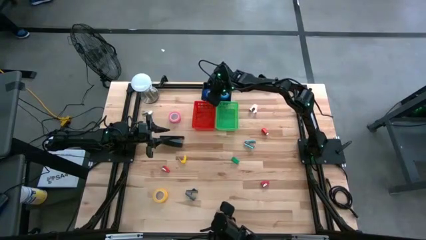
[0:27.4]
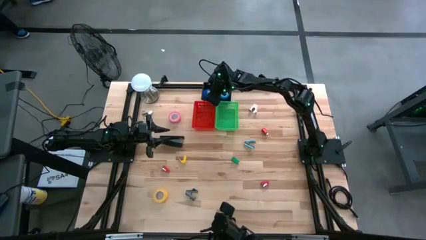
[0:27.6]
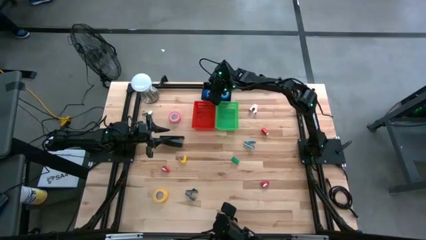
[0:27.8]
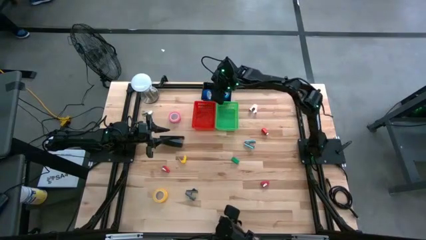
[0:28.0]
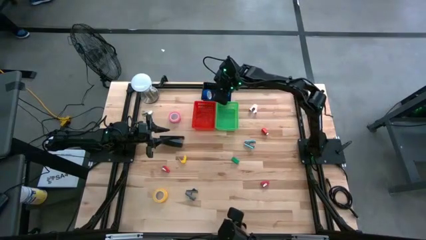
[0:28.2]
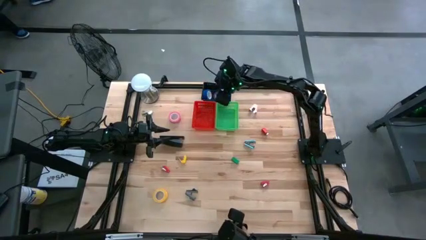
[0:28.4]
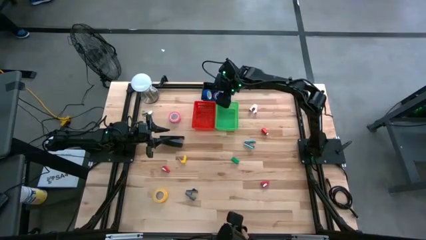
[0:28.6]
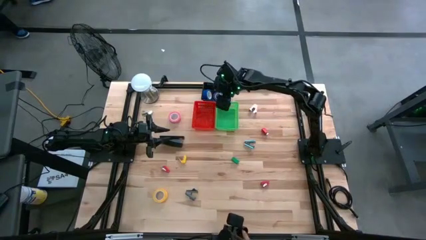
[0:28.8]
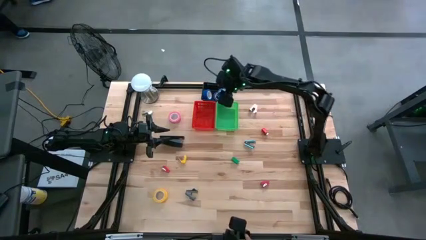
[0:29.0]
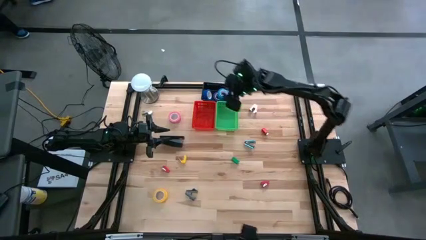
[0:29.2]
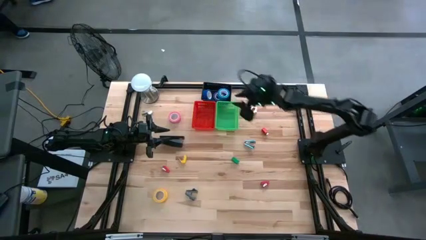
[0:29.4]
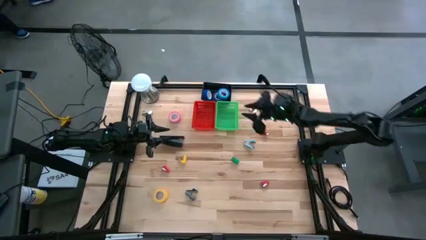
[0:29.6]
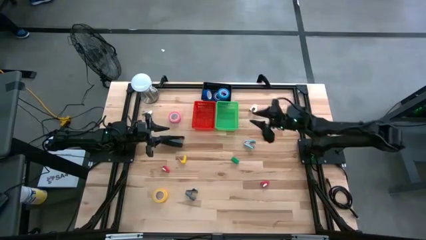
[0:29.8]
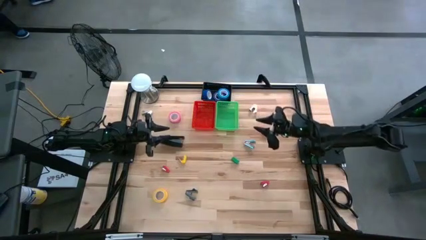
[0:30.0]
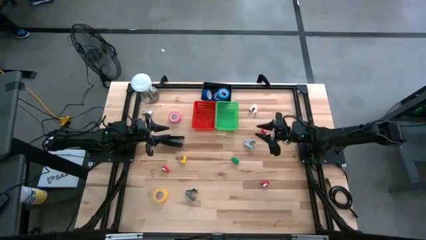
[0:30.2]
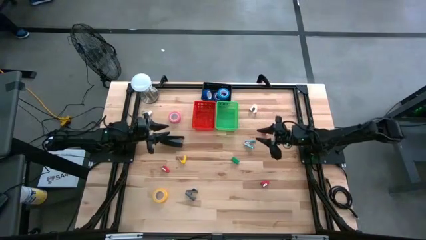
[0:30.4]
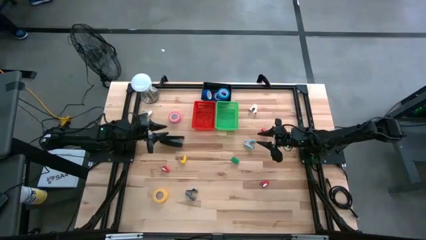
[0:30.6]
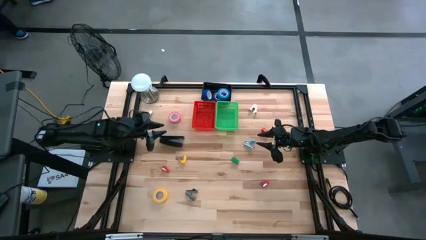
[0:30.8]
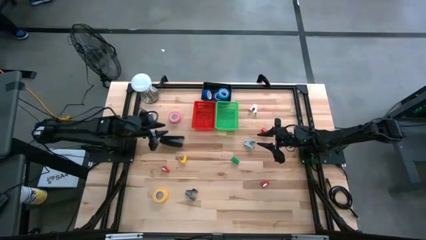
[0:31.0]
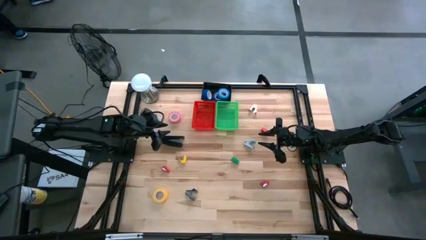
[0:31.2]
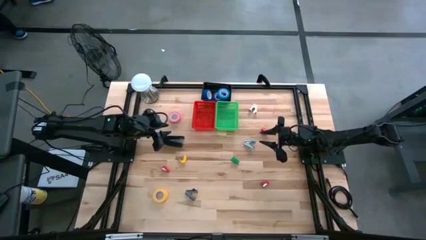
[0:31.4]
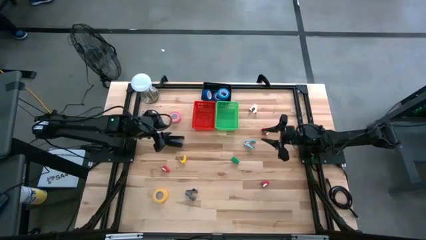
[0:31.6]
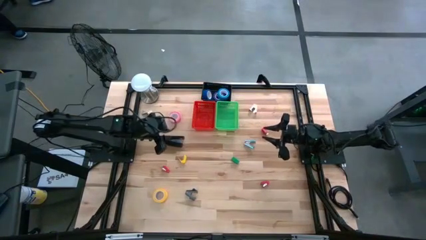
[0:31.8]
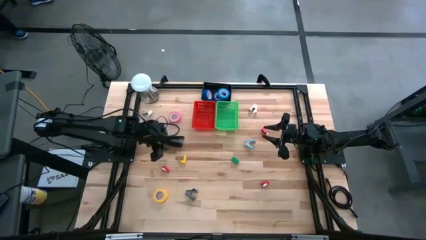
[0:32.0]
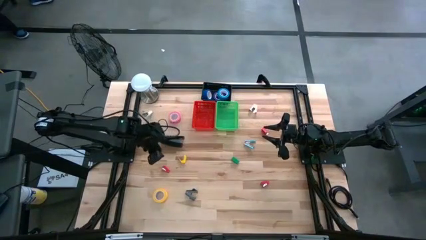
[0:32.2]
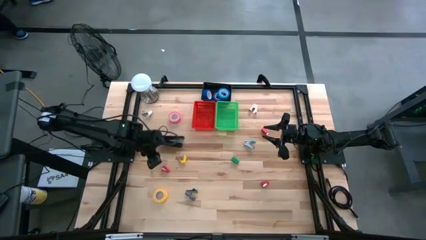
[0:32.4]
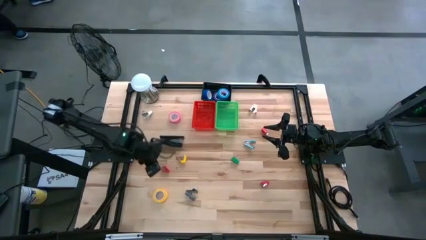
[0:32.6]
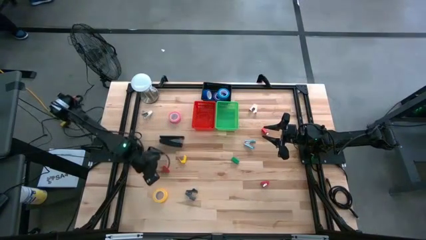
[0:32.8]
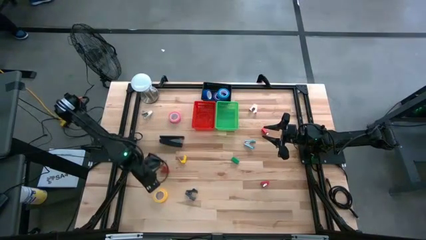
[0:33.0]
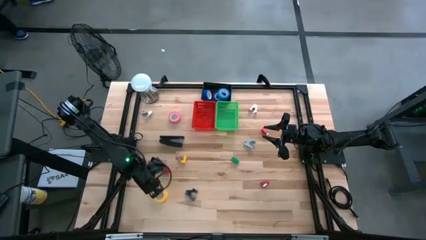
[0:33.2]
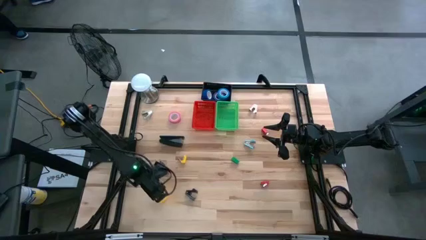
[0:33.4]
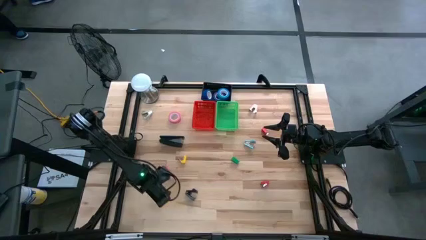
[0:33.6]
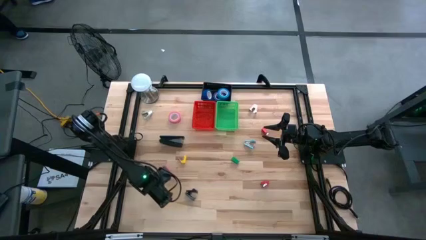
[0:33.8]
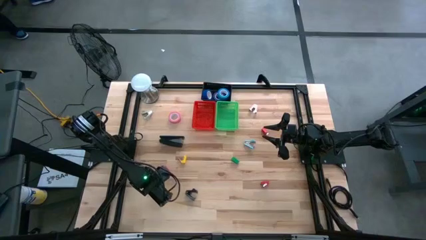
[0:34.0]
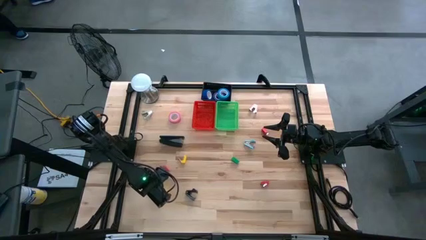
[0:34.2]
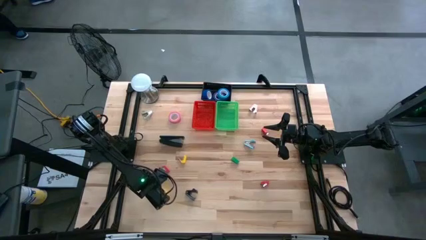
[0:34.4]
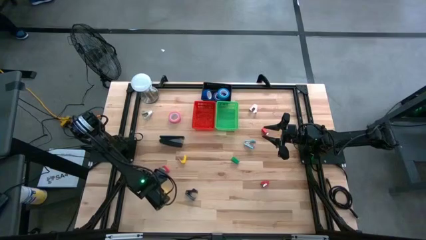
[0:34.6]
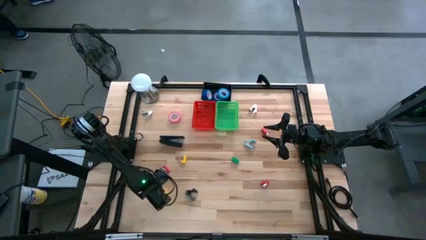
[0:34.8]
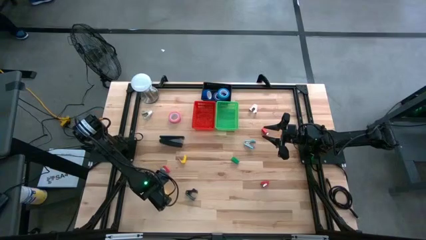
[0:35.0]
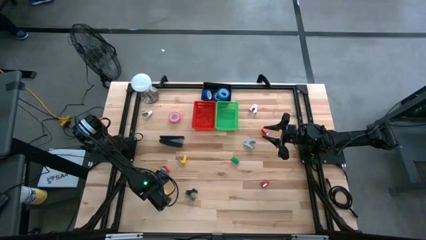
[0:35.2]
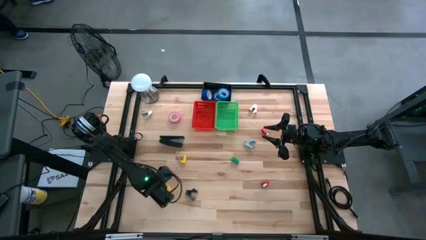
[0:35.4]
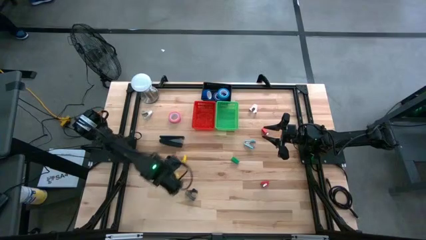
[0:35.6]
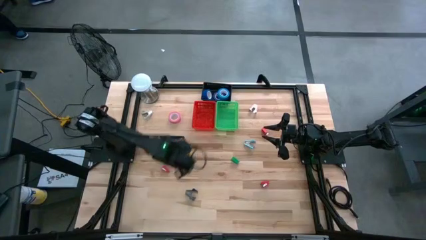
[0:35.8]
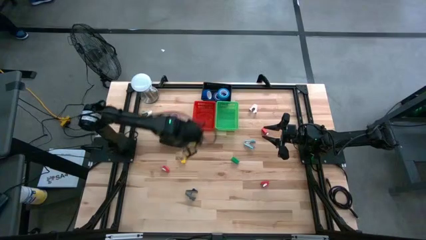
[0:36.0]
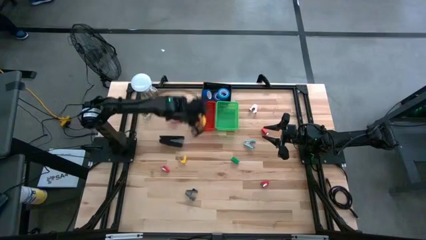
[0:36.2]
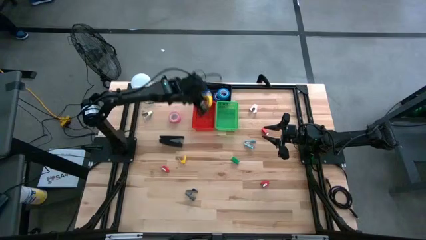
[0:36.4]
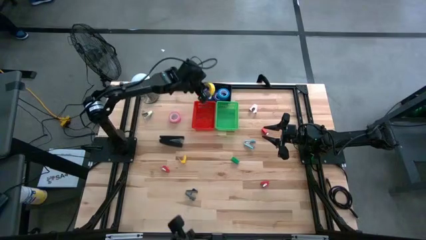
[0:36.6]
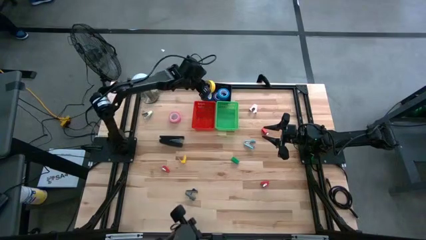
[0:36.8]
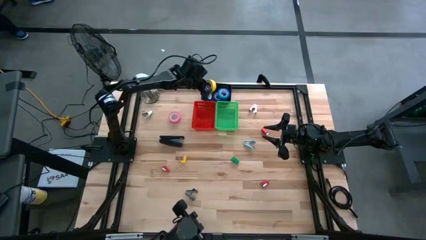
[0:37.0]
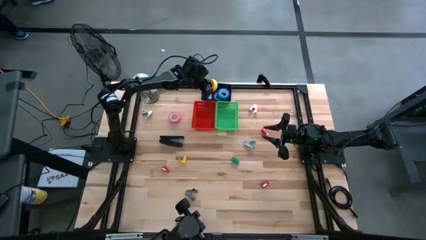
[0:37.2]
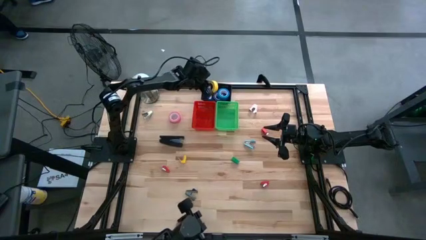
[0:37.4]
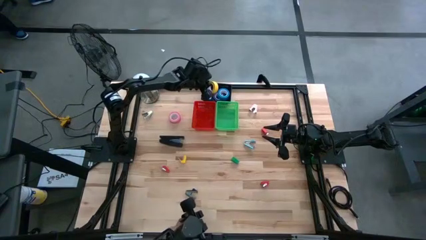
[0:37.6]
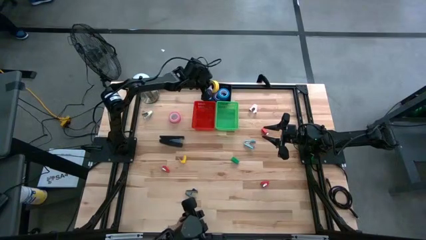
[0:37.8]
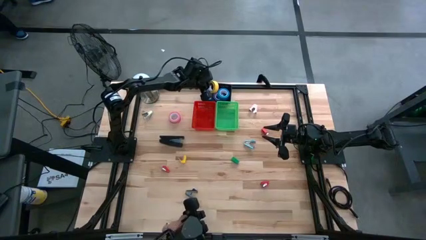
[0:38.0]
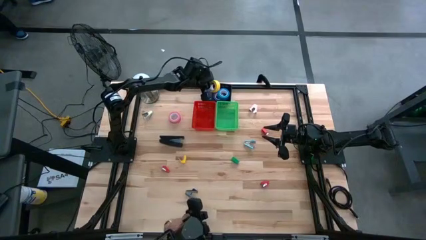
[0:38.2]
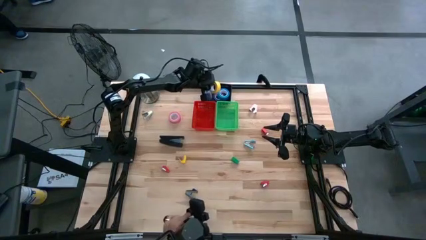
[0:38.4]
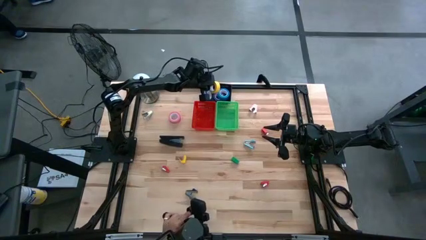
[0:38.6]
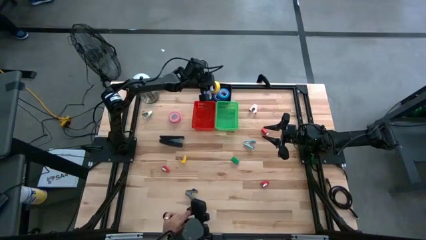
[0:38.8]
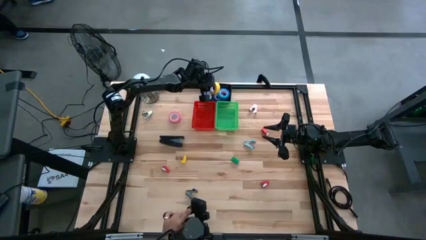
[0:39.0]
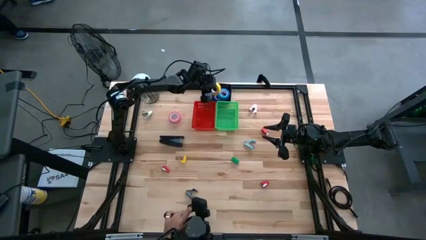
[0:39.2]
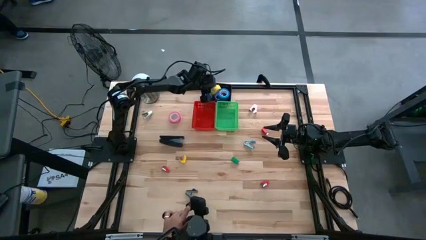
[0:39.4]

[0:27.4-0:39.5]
Task: Pick and place Stapler, Stapler remover, tape
Put the yellow tape into the black bin

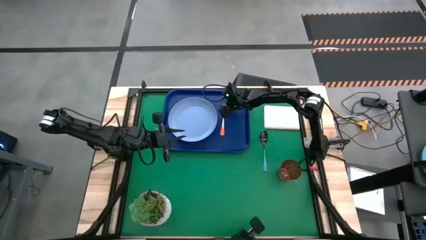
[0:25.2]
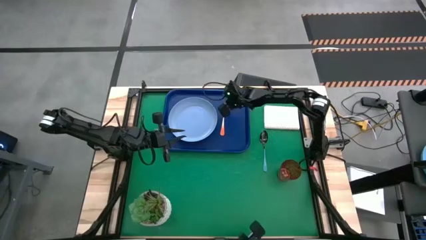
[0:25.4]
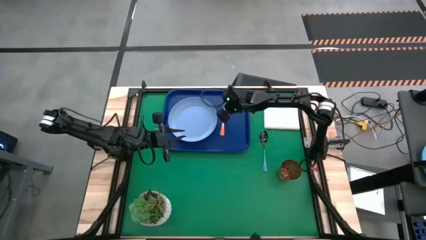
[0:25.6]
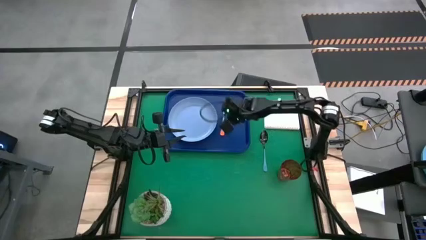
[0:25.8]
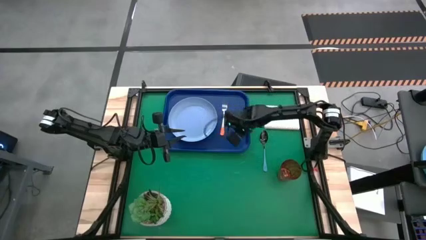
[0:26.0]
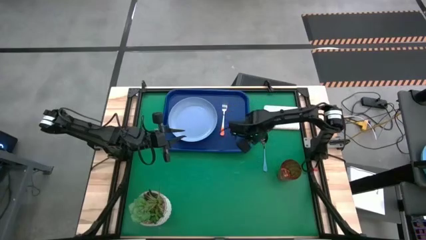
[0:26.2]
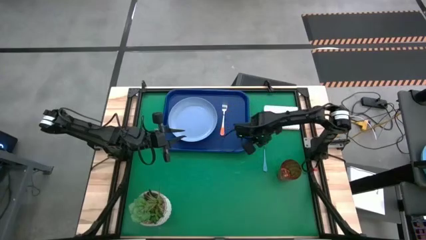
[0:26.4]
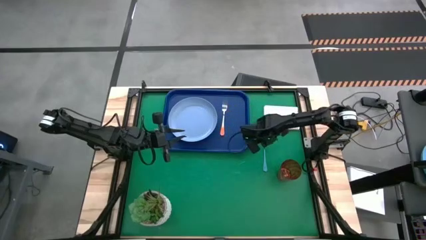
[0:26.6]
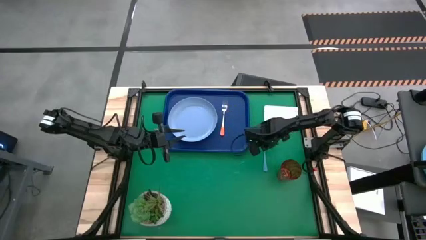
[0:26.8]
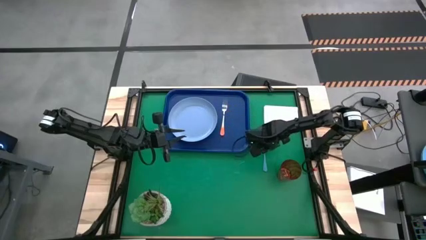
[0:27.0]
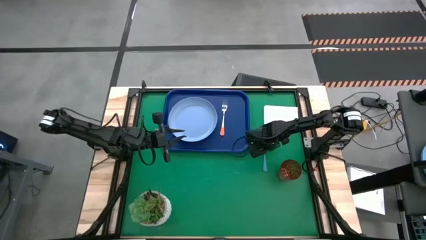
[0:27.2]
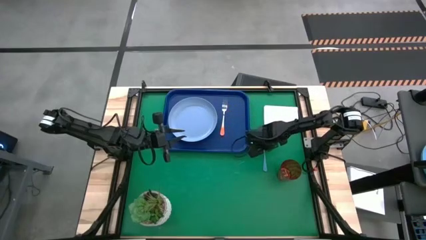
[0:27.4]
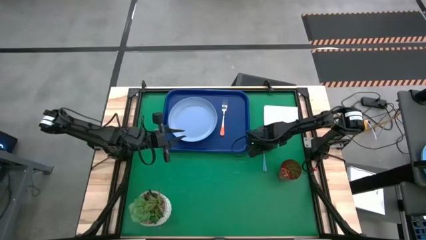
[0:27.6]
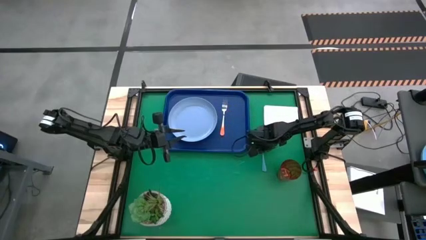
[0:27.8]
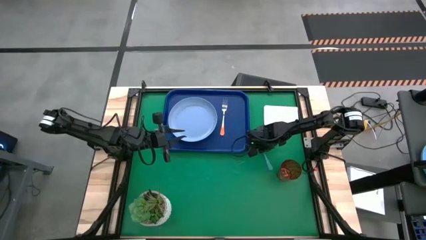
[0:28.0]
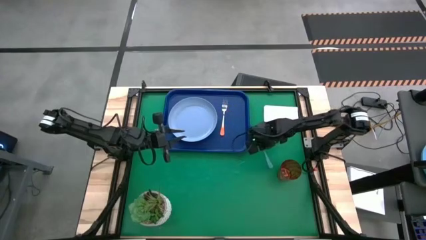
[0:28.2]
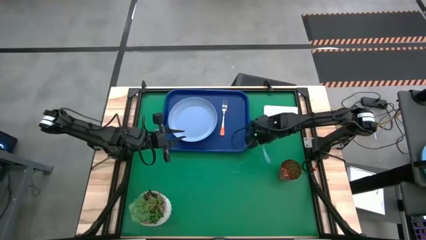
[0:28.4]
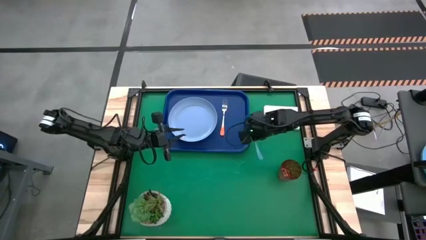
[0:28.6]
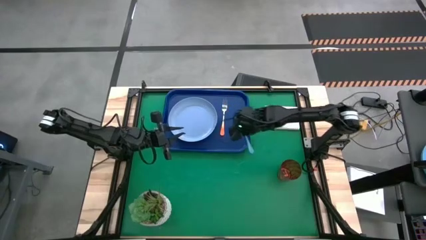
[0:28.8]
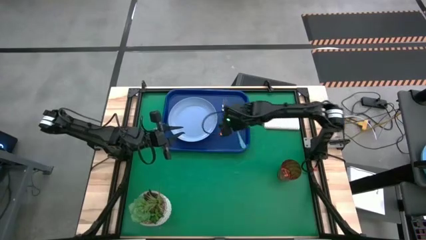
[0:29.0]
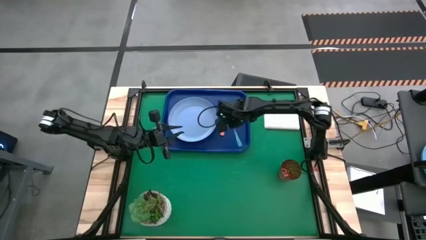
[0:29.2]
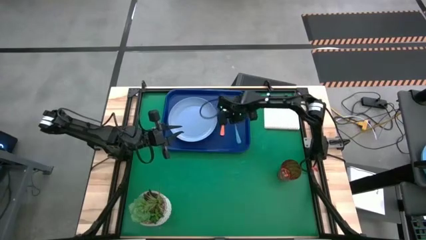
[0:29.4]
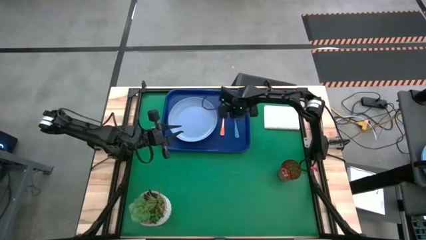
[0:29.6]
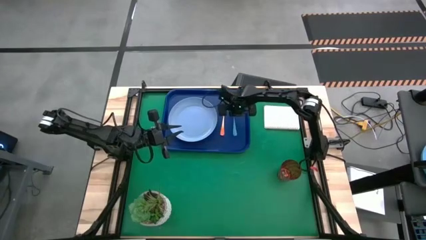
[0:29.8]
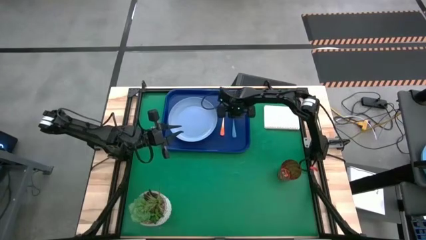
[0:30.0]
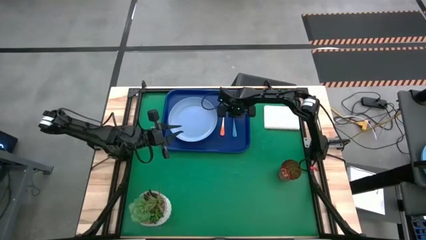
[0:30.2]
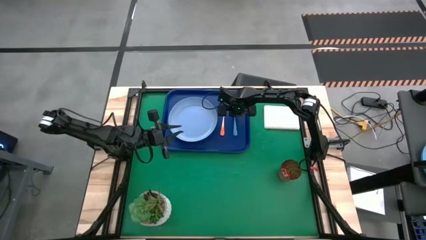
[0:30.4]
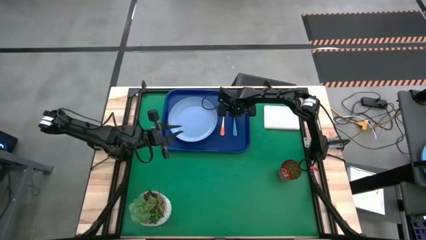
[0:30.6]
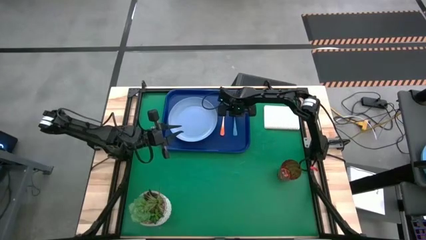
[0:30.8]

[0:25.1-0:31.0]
Task: Pick and place plate/cup/fork/spoon on tray
Put the blue spoon on the blue tray to the right of the orange fork
